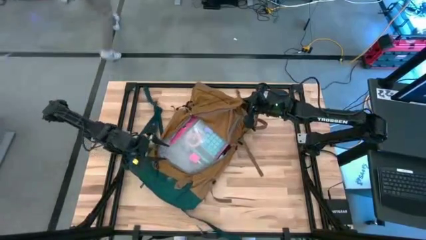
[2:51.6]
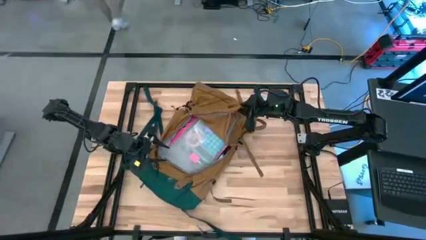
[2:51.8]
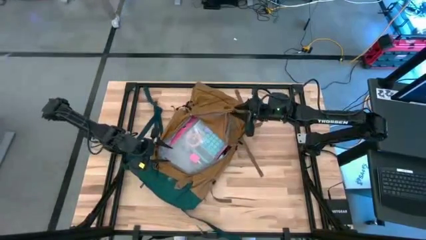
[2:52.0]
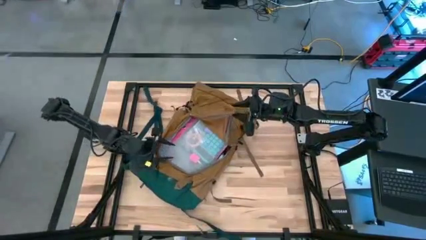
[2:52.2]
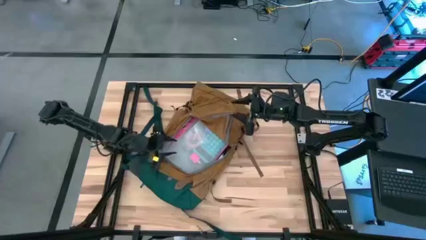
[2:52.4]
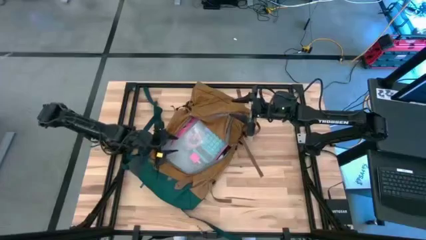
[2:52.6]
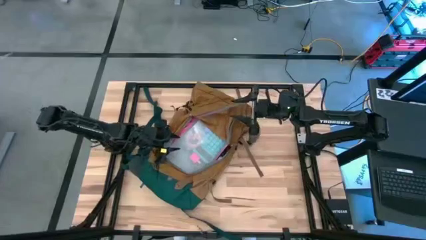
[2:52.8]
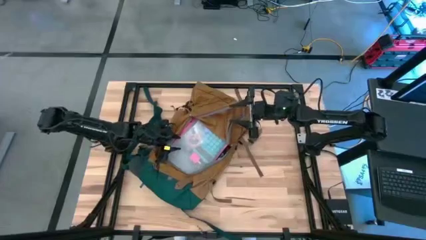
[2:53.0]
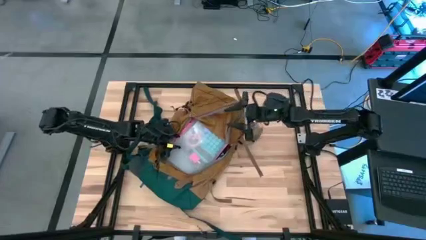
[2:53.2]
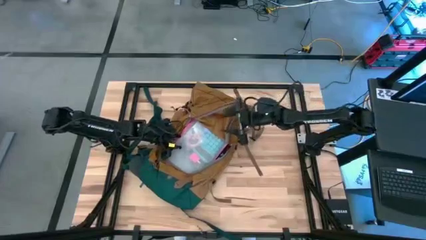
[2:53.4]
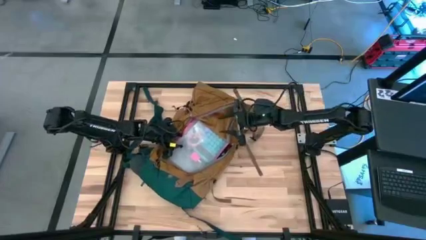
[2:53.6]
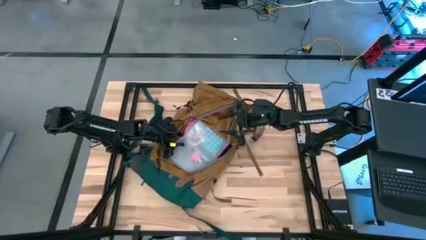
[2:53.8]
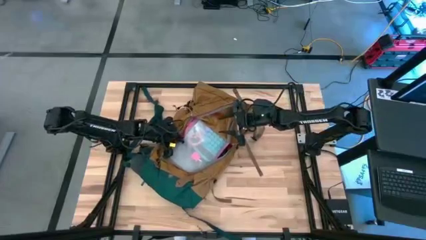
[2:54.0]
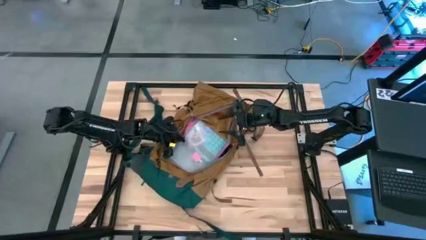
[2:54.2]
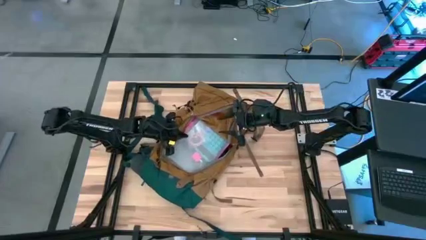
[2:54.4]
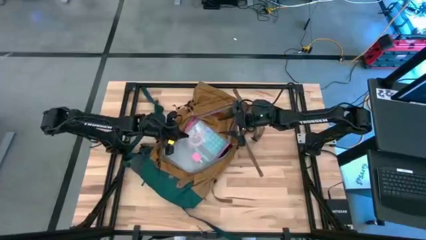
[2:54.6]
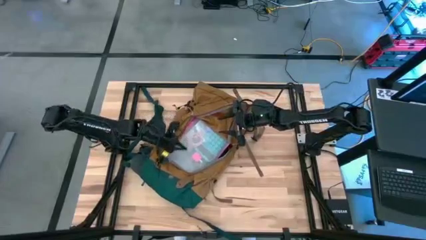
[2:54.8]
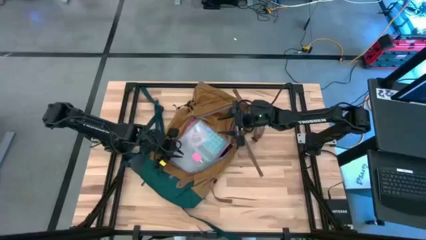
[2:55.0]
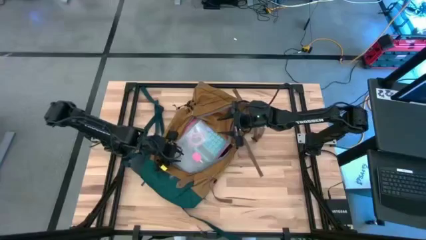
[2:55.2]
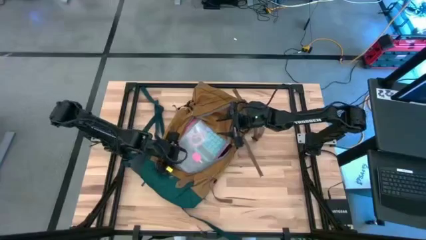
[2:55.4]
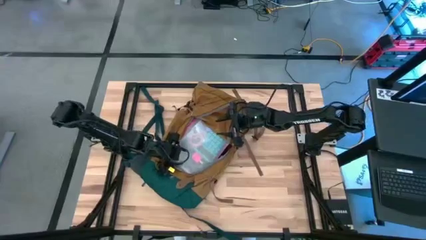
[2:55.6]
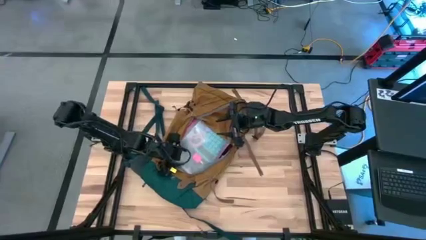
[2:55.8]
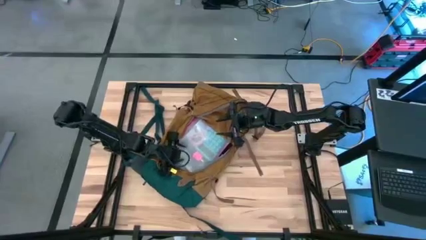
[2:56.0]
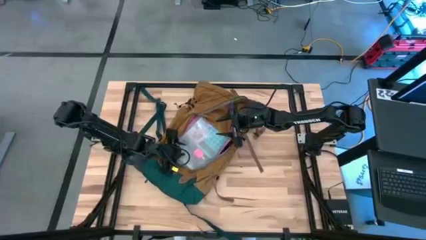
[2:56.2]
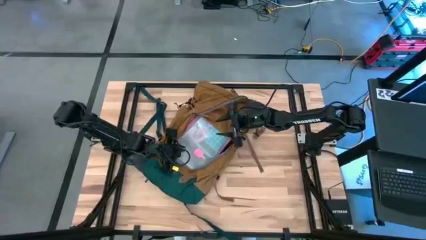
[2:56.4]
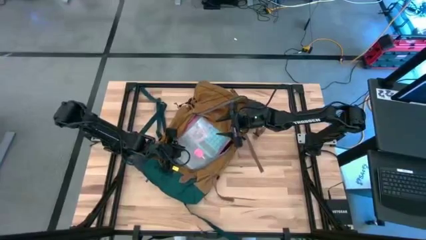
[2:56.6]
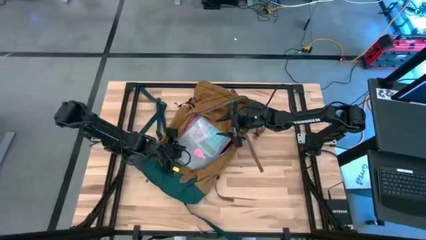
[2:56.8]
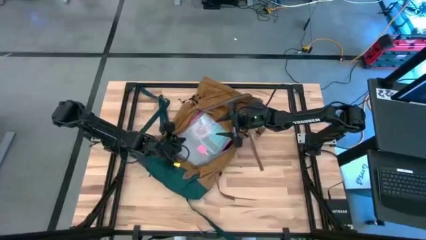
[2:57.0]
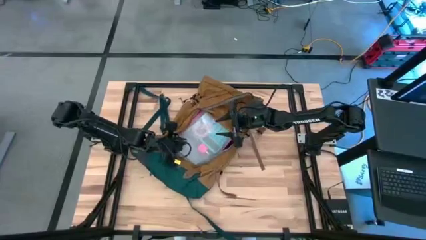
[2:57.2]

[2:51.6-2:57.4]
Task: Unpack backpack
Remove the pink zipper pouch from the brown backpack

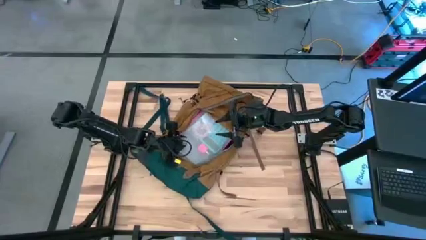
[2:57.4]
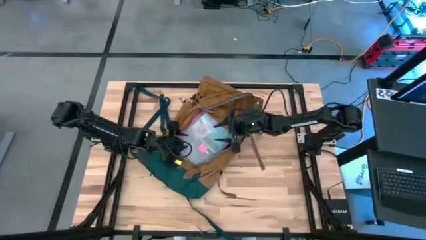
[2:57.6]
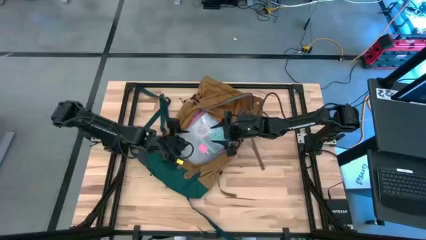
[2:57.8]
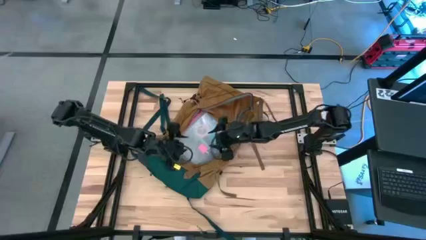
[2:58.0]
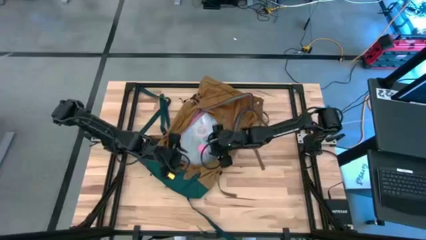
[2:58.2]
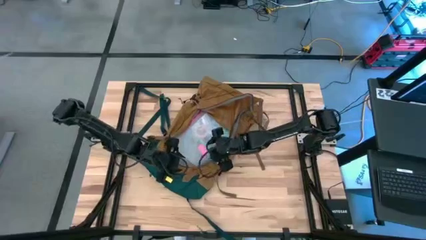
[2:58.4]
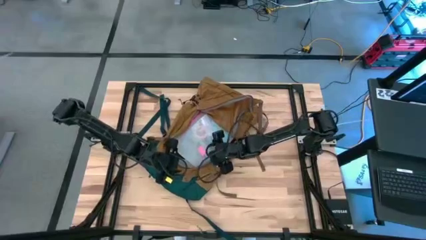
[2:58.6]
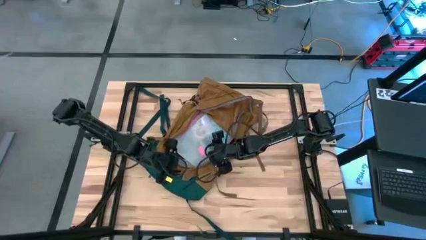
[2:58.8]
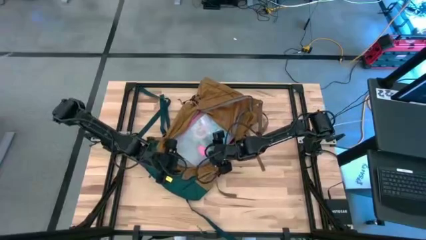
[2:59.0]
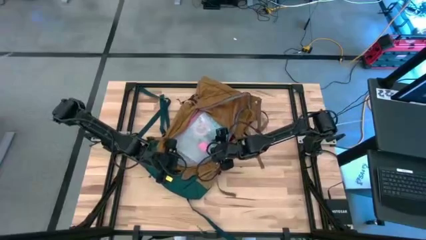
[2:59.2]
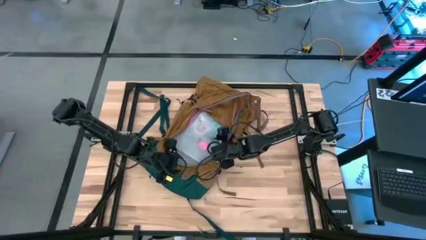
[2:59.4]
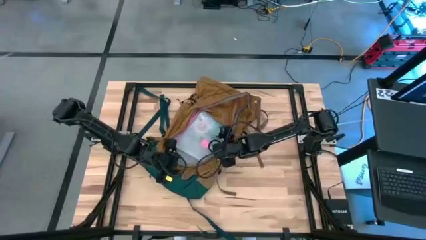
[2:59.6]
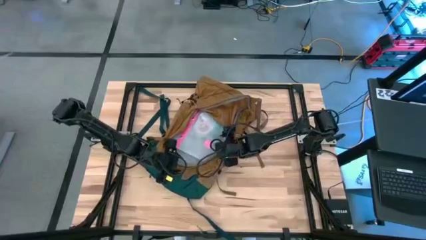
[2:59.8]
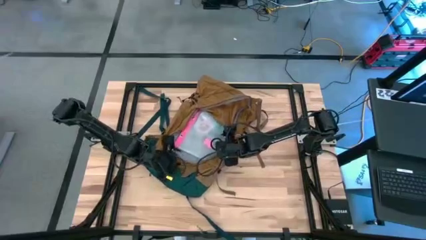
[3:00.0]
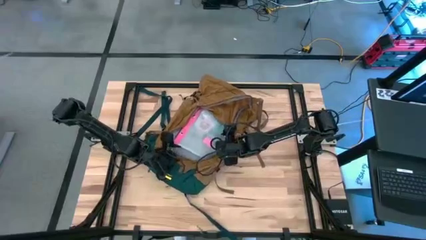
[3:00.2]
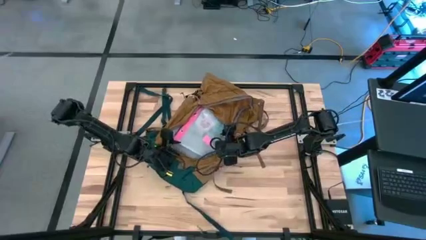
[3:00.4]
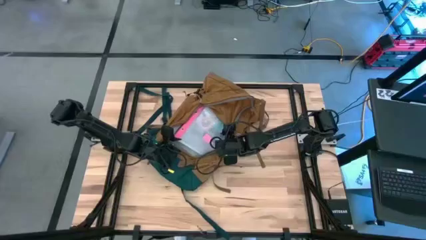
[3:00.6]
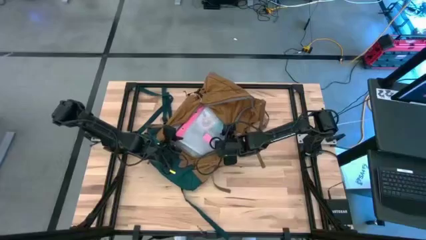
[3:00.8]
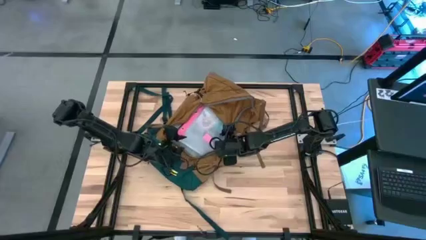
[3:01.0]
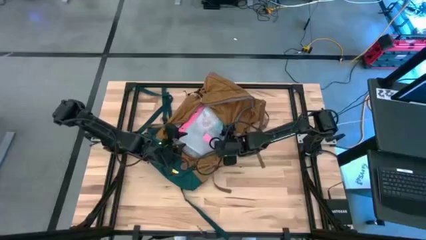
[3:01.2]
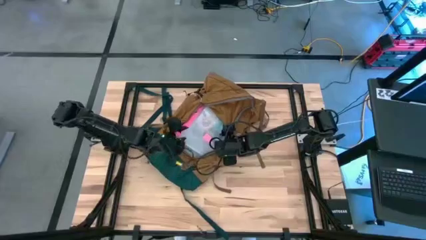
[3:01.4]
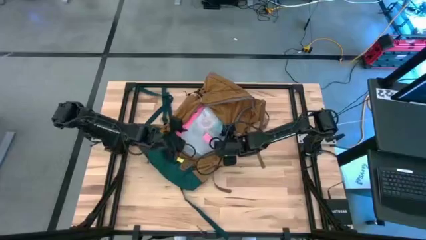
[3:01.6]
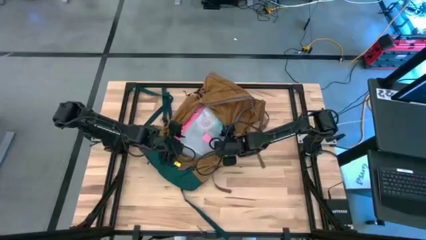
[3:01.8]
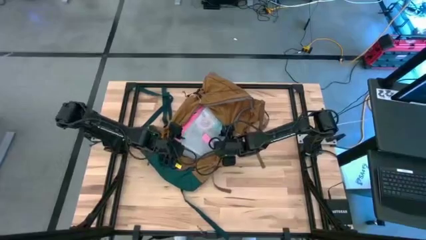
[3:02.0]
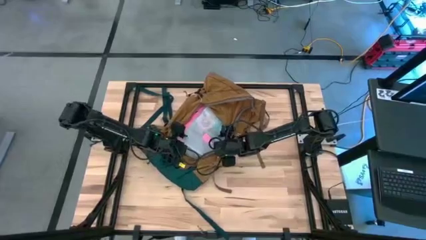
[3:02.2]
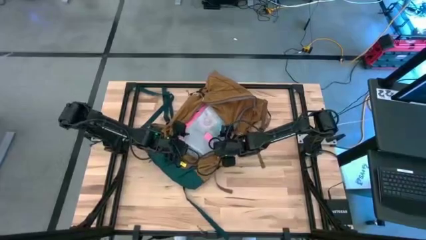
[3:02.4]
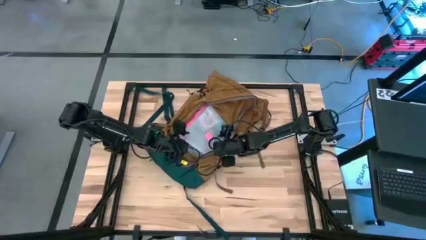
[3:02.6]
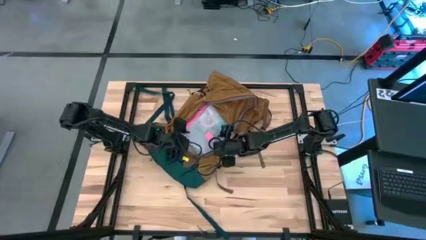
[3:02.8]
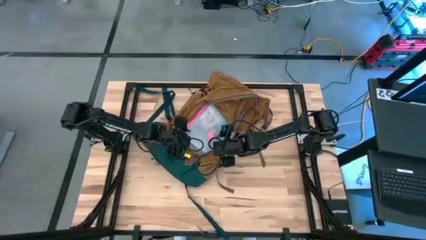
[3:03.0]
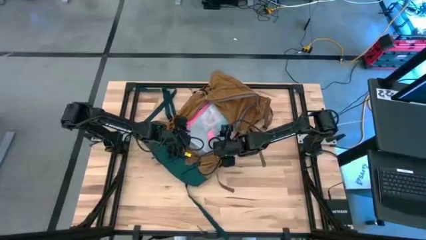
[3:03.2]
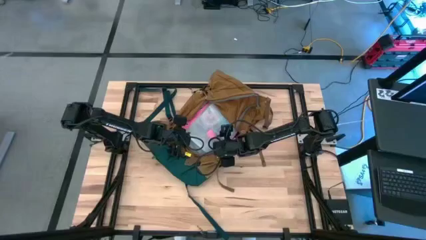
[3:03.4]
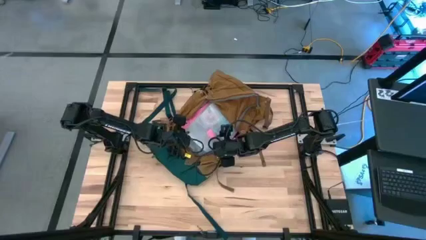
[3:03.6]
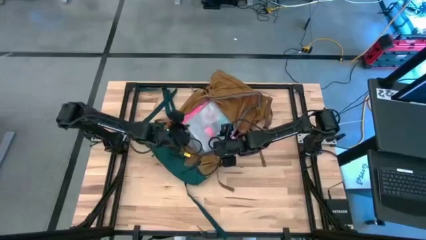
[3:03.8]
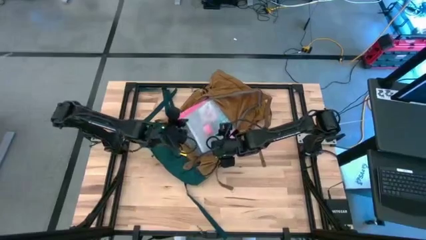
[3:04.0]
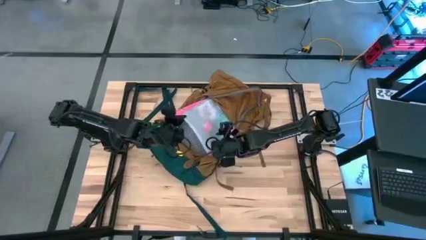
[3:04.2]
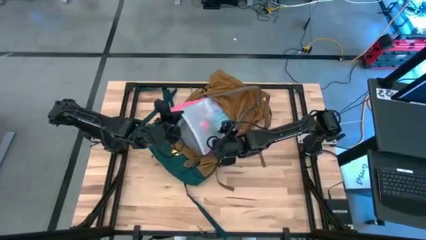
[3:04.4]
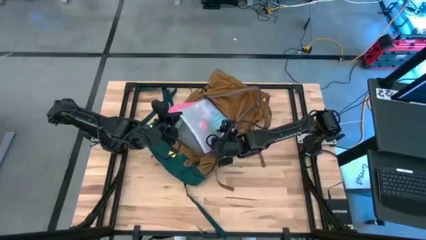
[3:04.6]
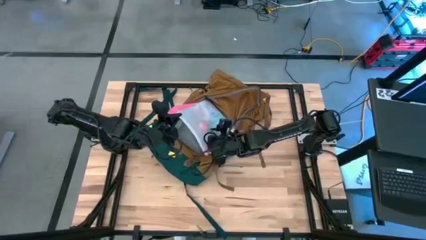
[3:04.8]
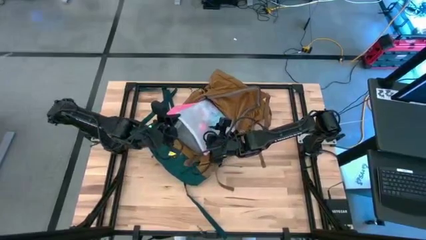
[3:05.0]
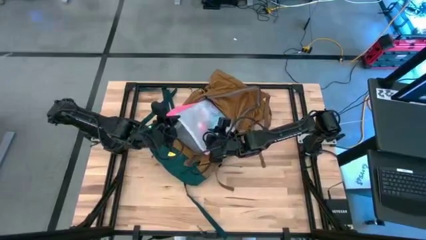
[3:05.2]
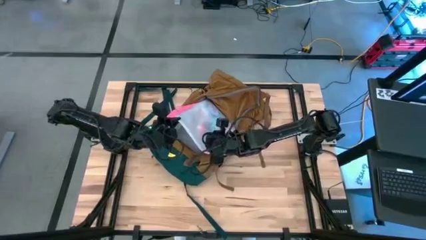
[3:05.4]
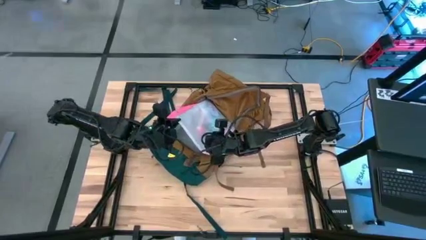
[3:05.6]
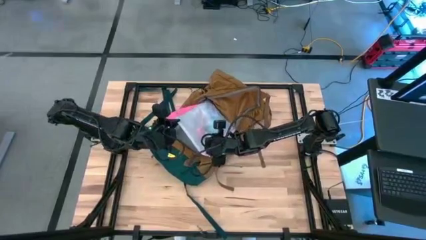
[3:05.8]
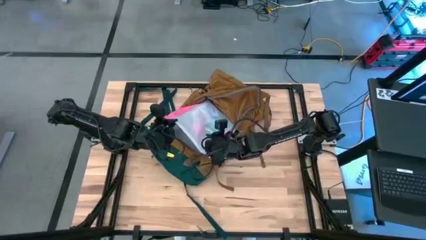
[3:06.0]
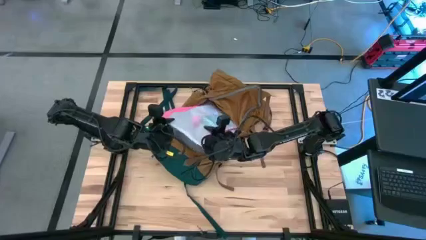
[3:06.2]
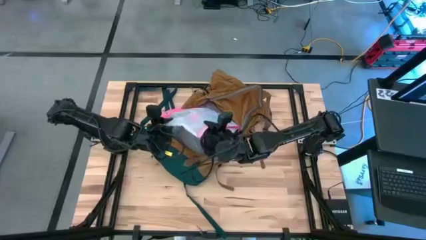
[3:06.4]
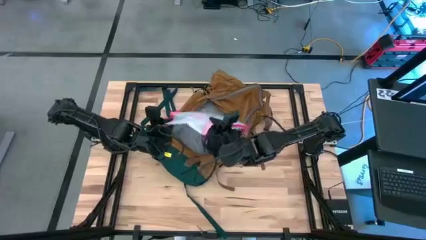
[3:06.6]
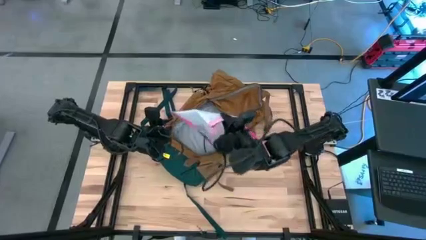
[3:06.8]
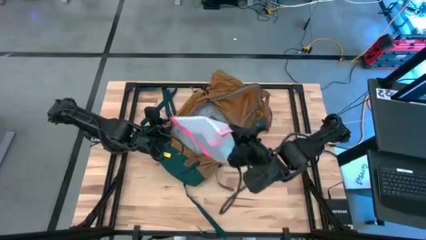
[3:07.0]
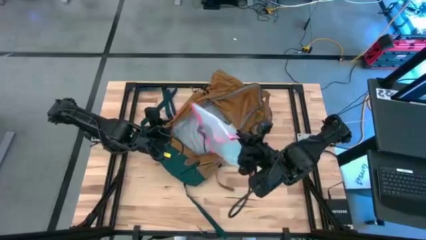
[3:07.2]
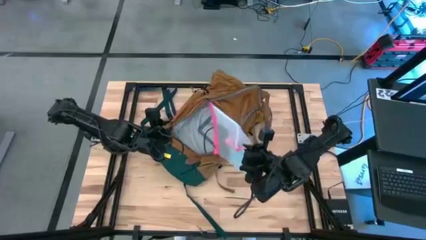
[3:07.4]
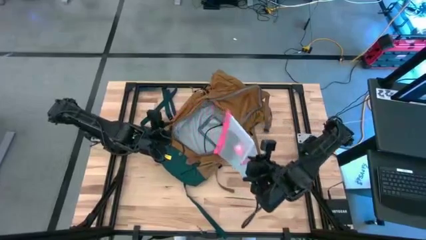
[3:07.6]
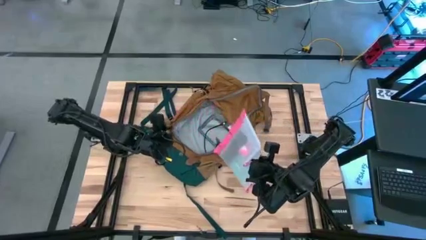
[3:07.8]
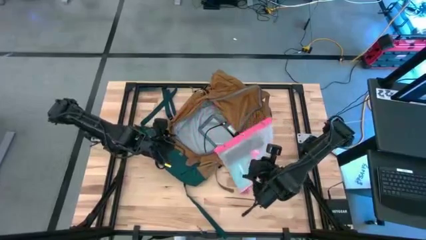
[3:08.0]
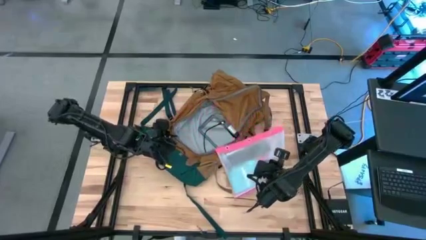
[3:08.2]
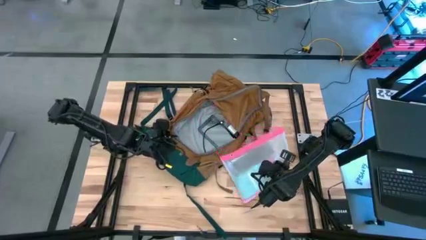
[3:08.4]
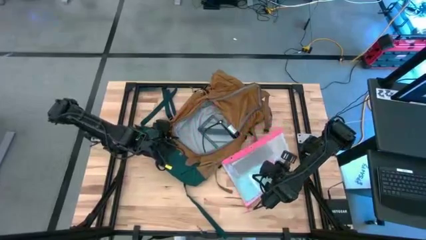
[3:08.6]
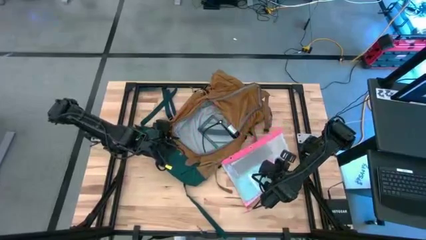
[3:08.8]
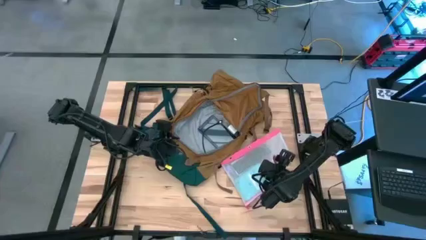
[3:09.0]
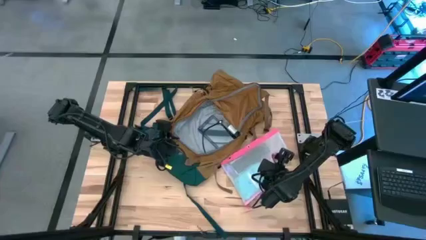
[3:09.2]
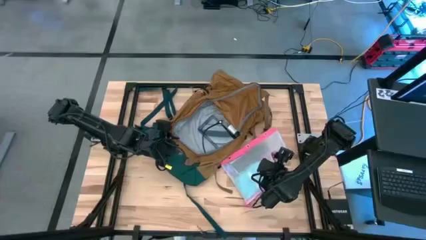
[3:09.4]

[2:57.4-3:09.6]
Remove the pink zipper pouch from the brown backpack
